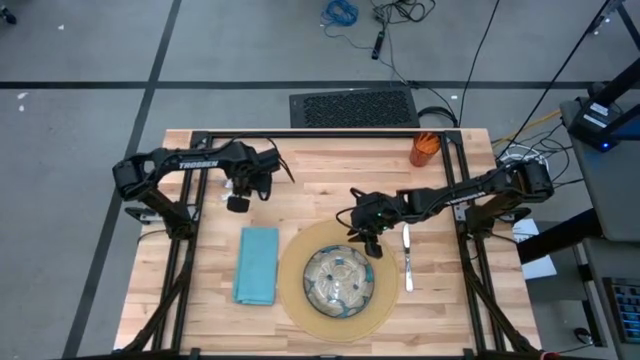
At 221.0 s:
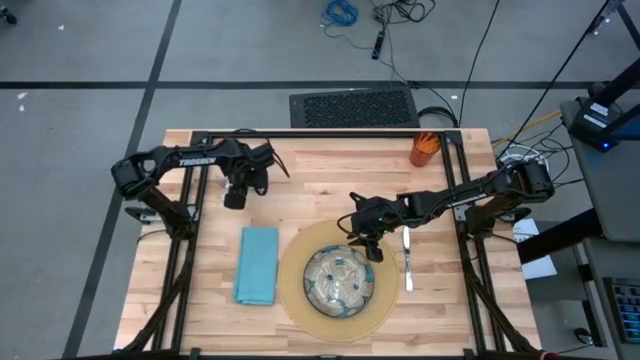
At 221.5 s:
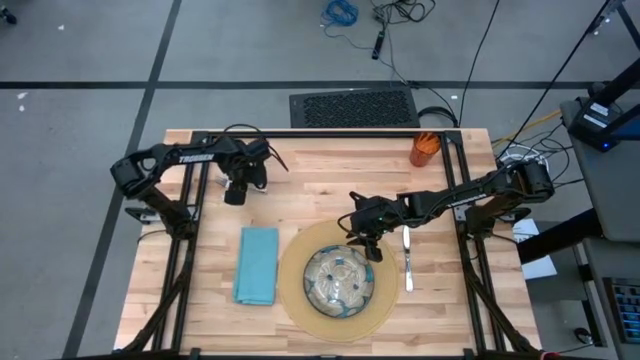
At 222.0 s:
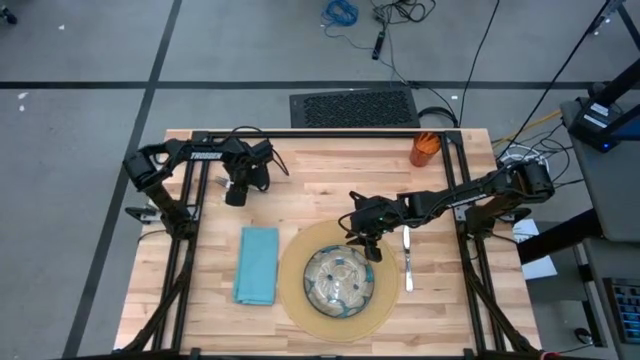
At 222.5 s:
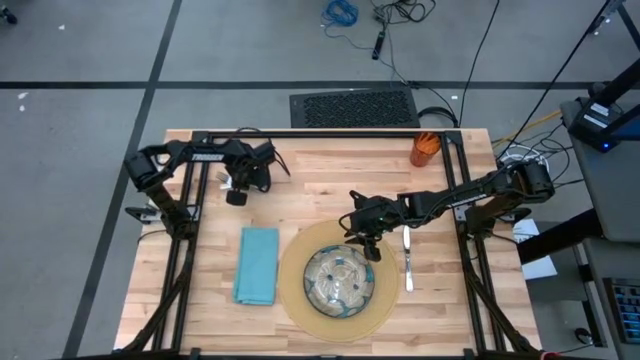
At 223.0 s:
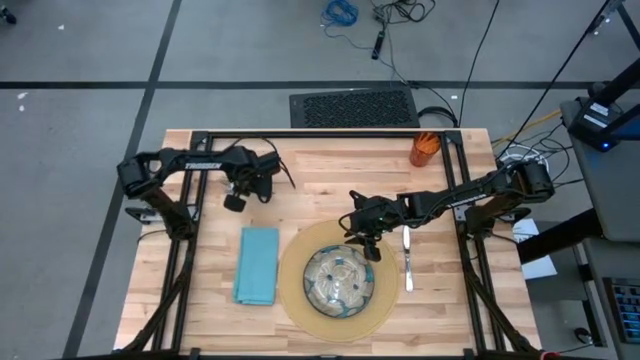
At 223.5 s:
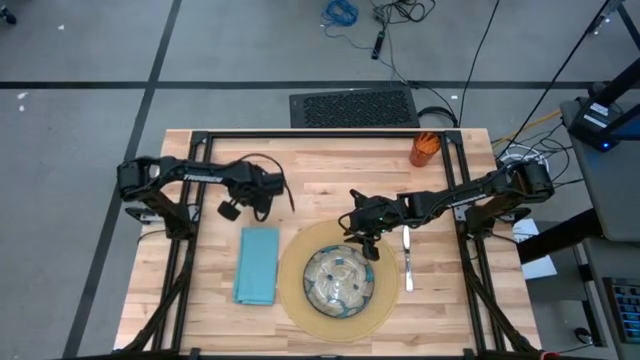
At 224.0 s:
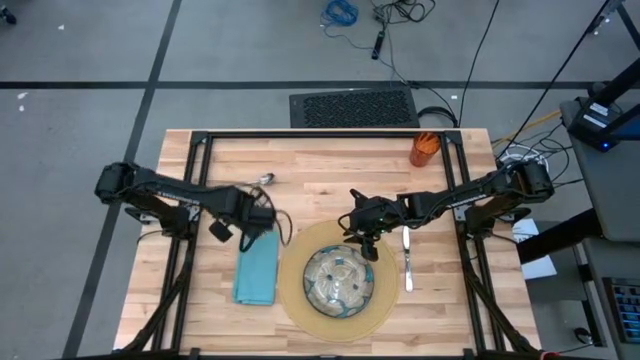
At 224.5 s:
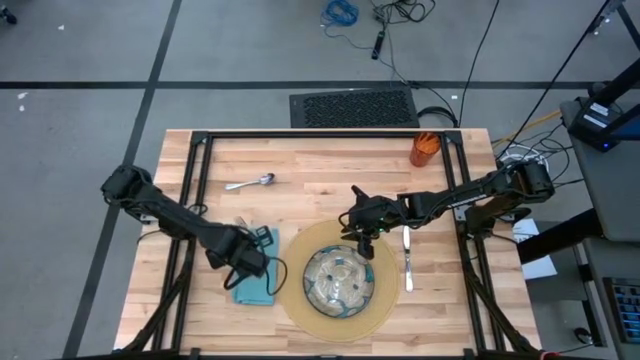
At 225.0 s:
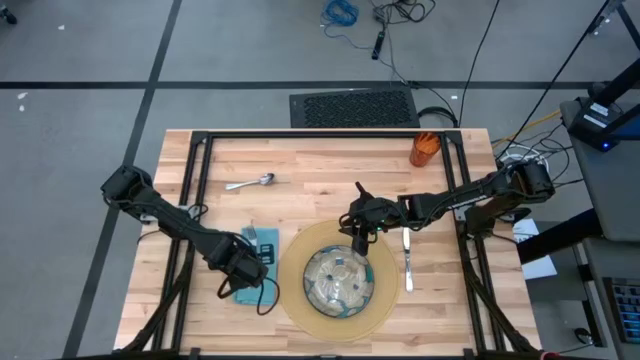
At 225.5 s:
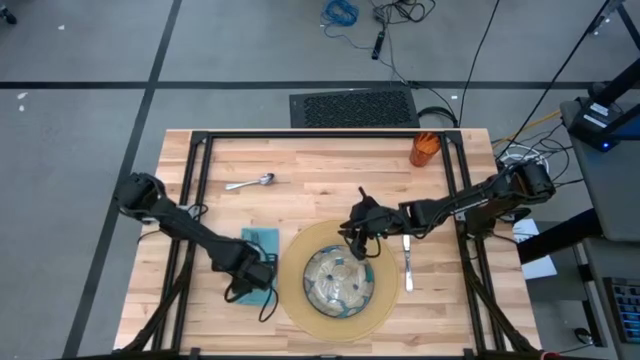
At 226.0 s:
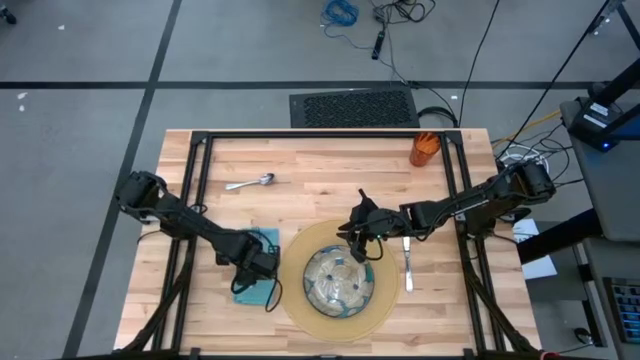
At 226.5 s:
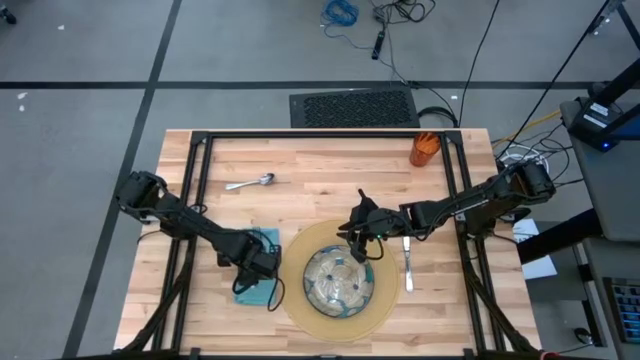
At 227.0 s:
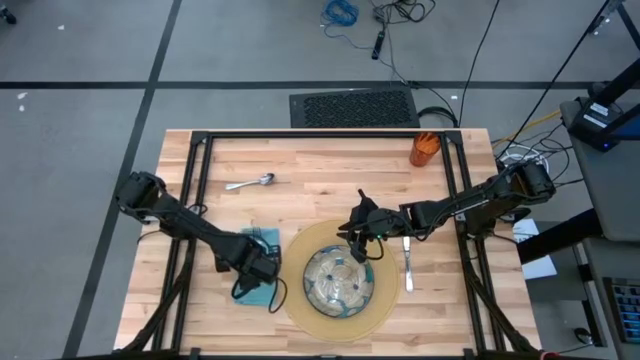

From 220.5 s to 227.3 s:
Task: Set table place
Put the silver fork on the blue napkin on the table

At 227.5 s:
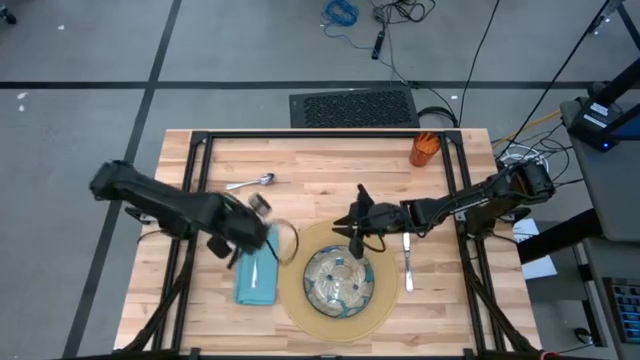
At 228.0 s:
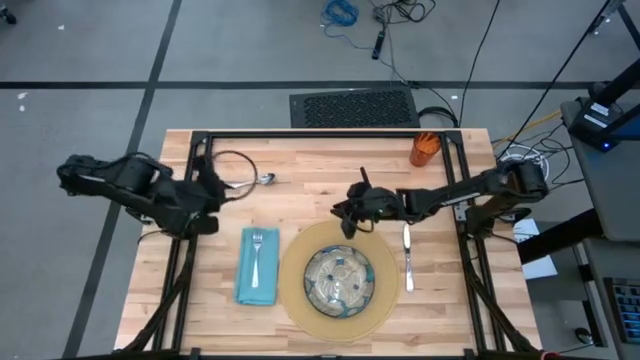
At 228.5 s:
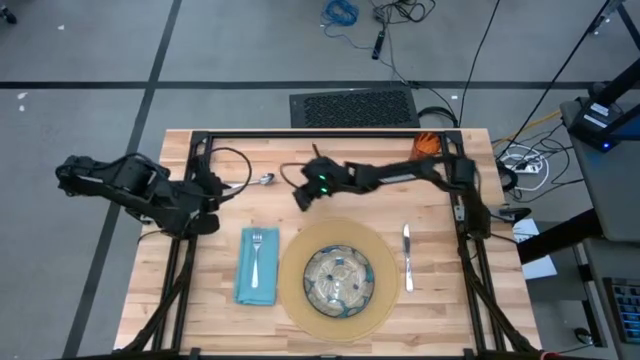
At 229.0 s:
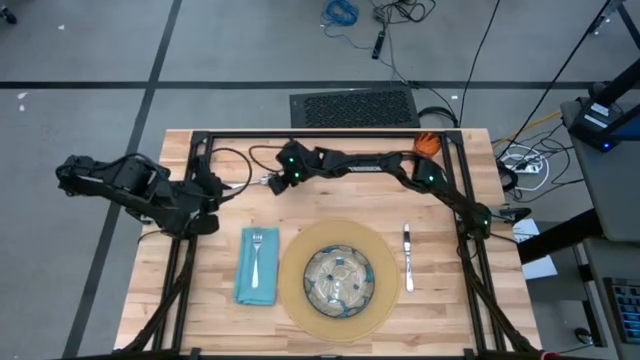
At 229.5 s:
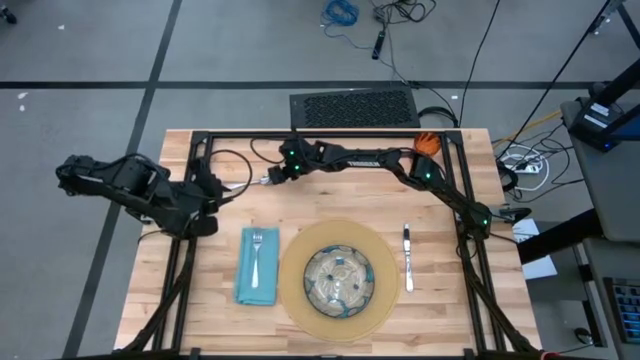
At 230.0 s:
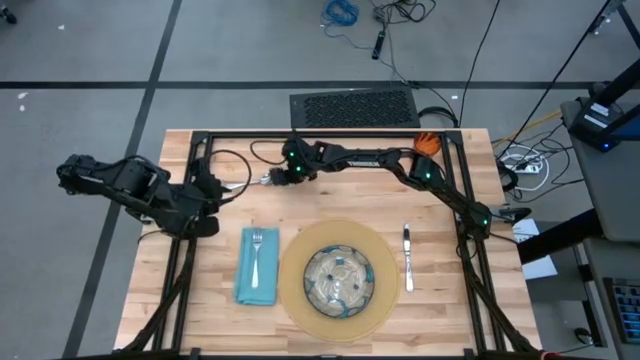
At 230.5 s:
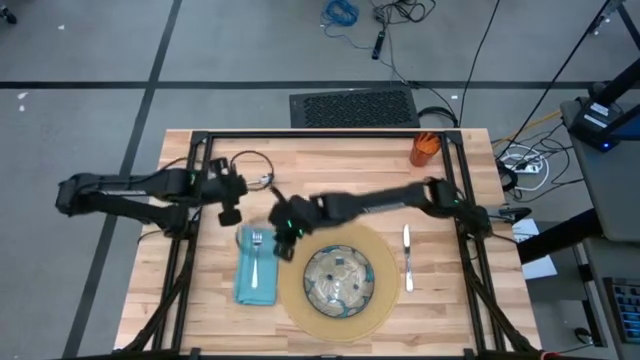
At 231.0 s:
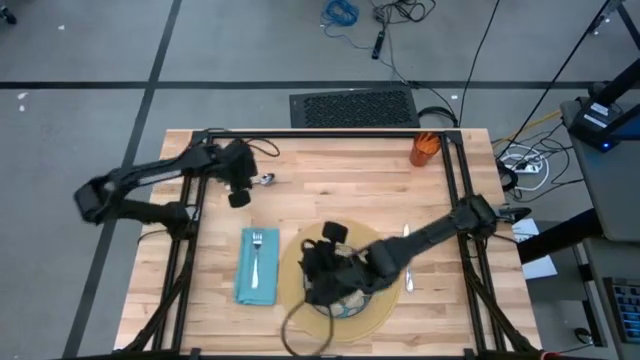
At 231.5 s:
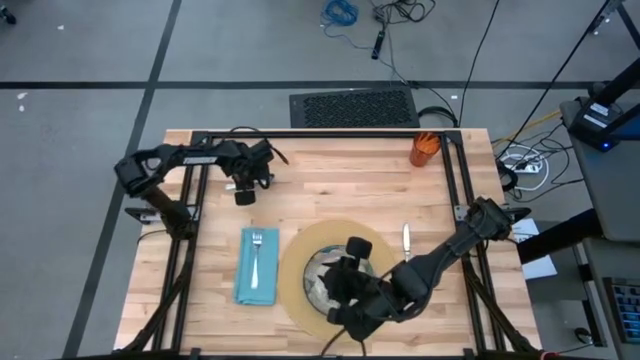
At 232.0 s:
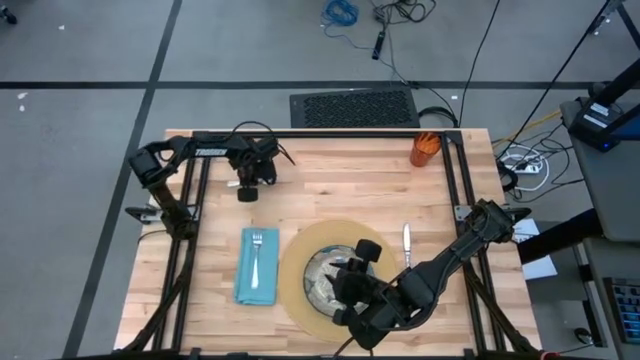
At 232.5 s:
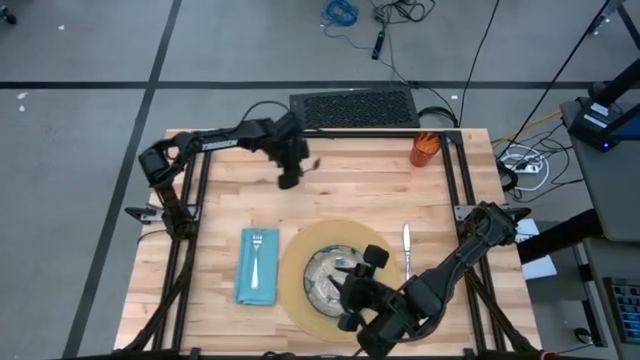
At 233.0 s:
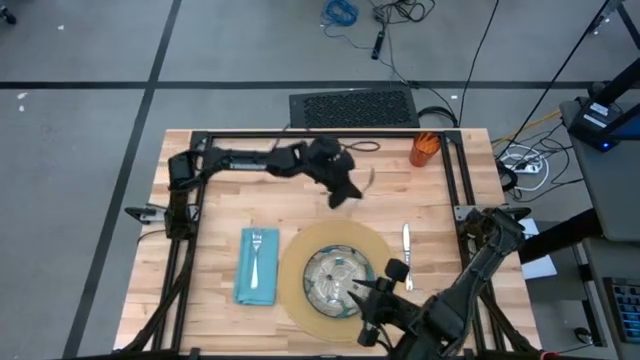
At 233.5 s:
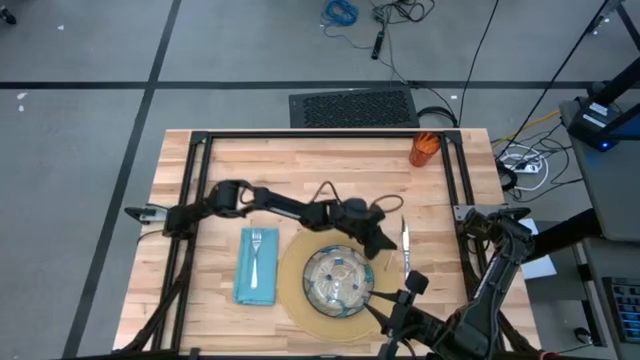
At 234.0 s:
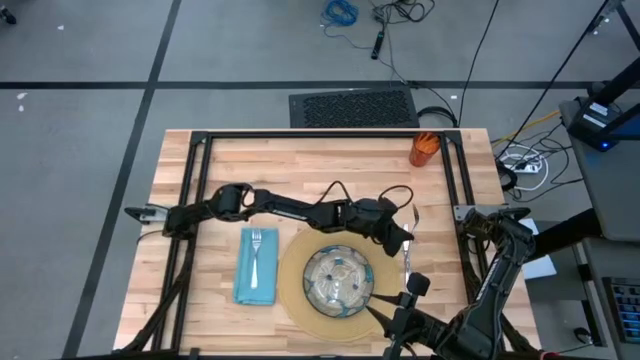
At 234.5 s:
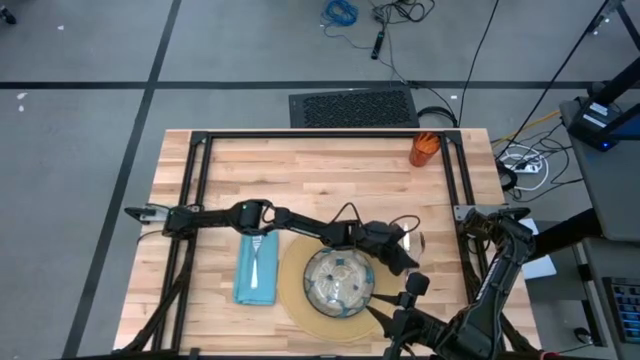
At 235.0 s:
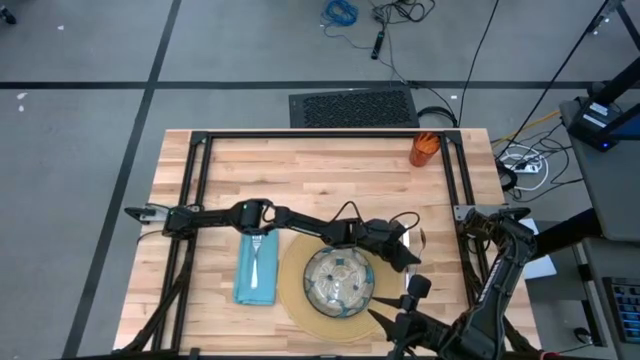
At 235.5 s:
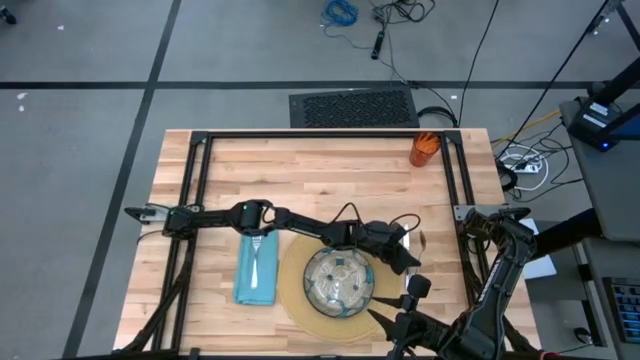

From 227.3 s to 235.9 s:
Put the silver spoon on the right side of the table beside the silver knife

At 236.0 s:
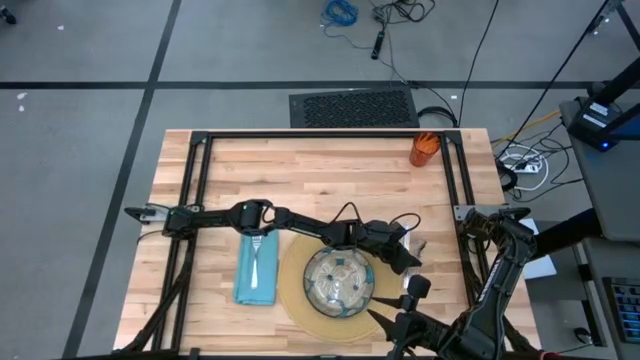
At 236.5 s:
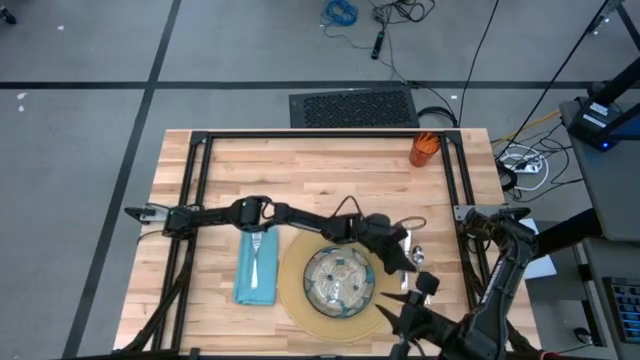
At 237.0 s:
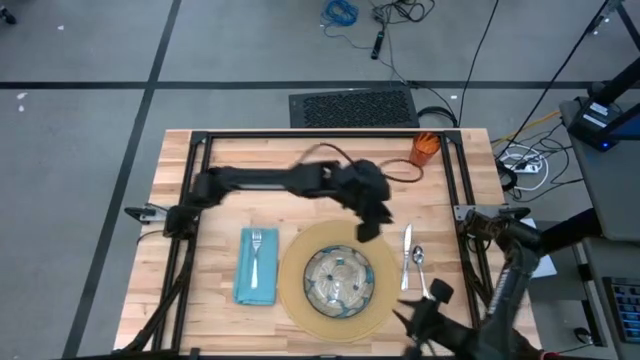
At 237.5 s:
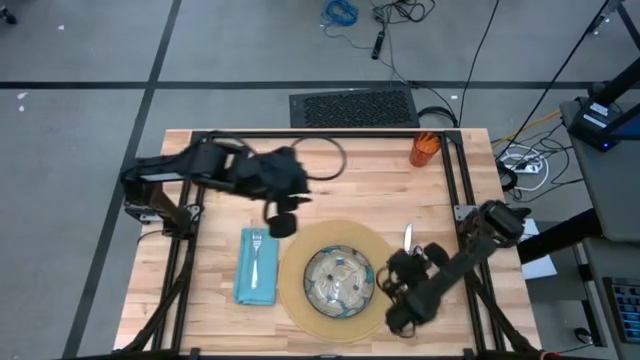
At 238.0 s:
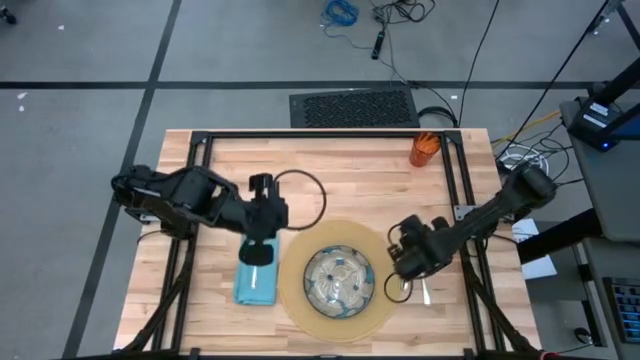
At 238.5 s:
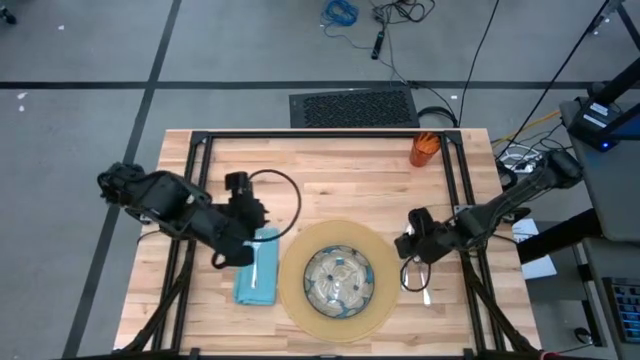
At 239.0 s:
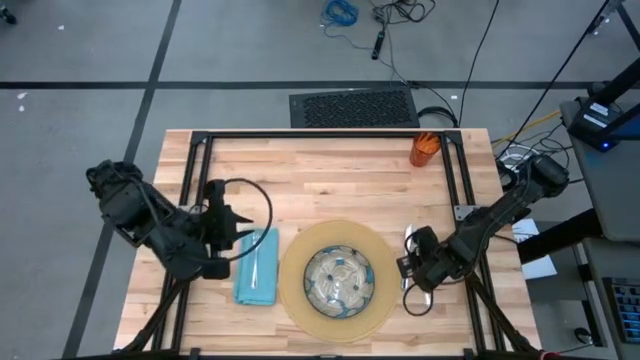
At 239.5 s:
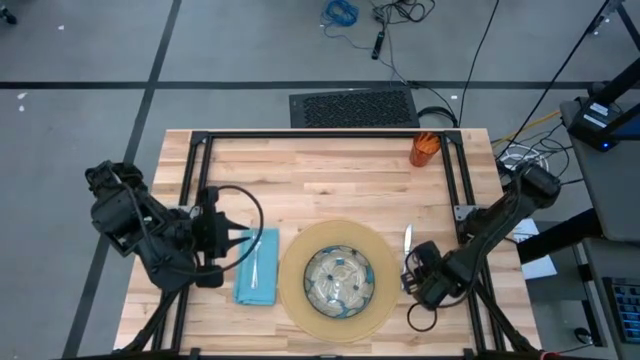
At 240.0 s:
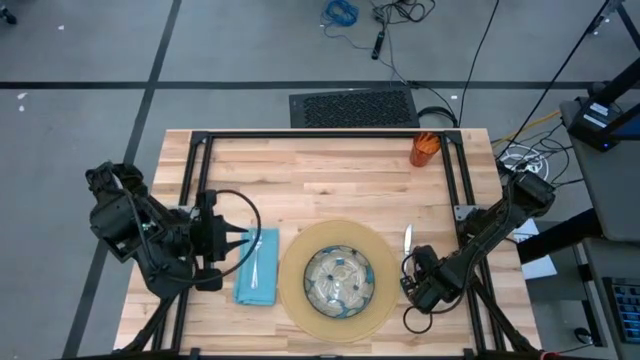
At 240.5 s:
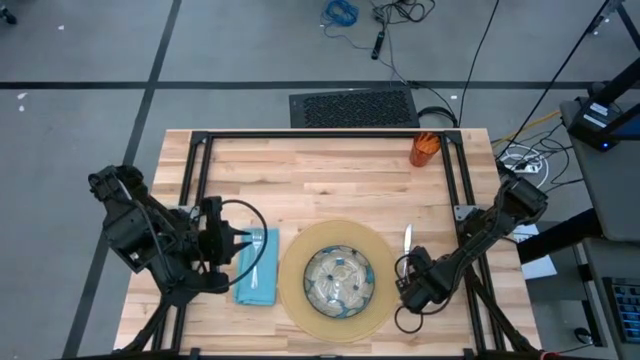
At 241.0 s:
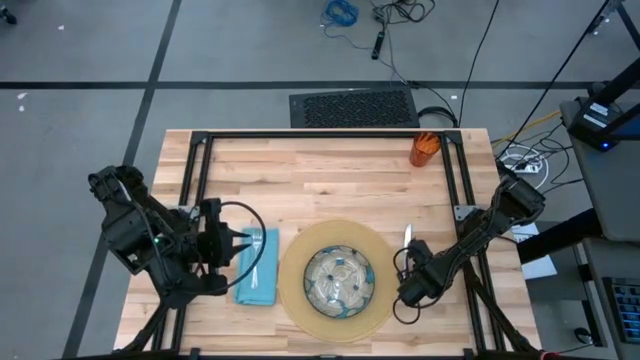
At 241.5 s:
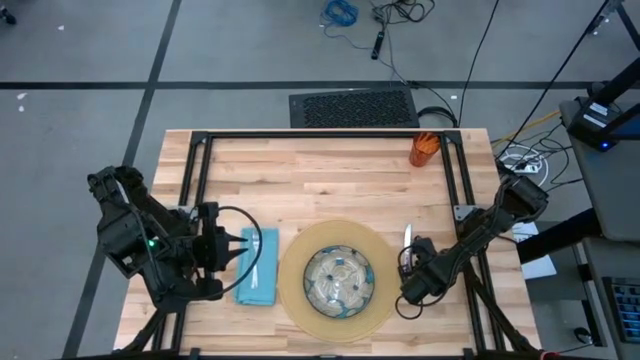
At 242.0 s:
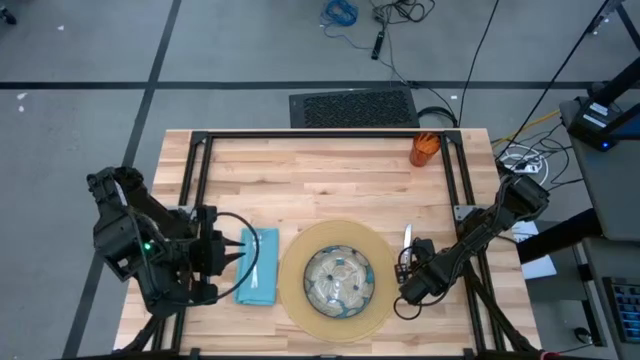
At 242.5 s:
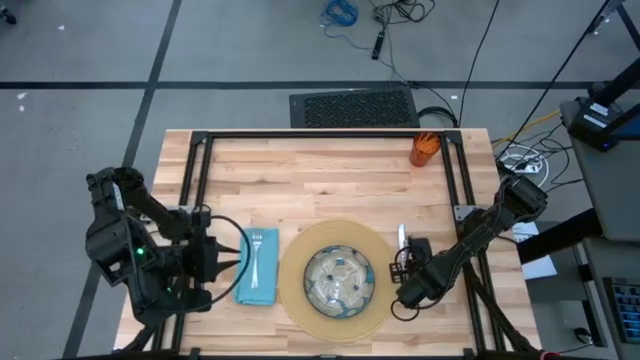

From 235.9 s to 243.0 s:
Adjust the silver spoon
